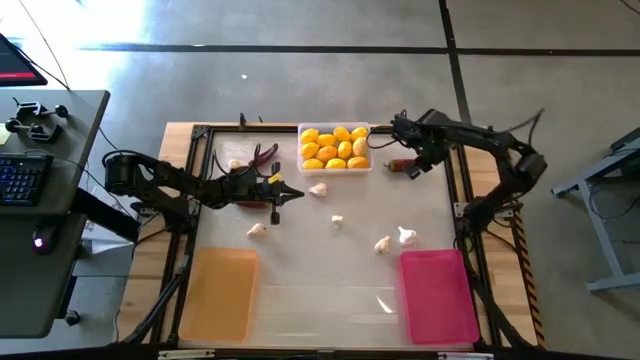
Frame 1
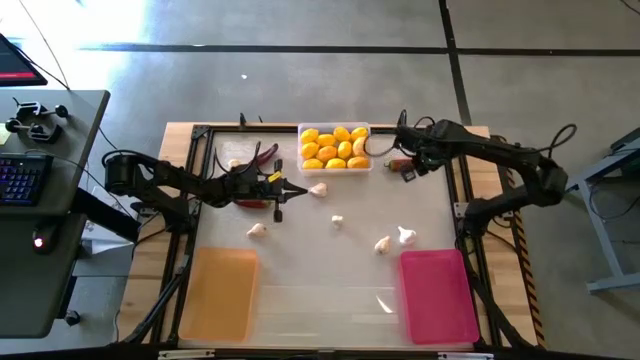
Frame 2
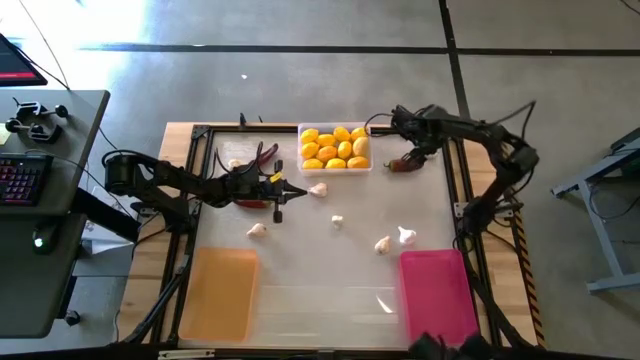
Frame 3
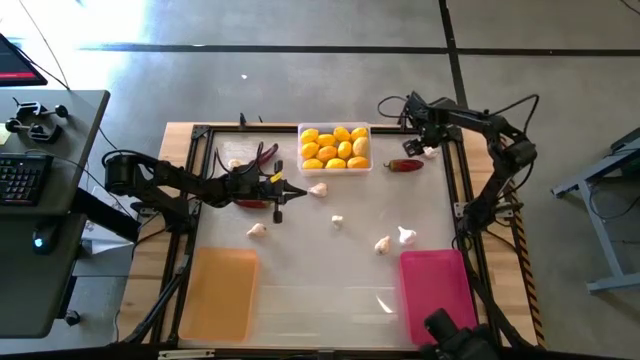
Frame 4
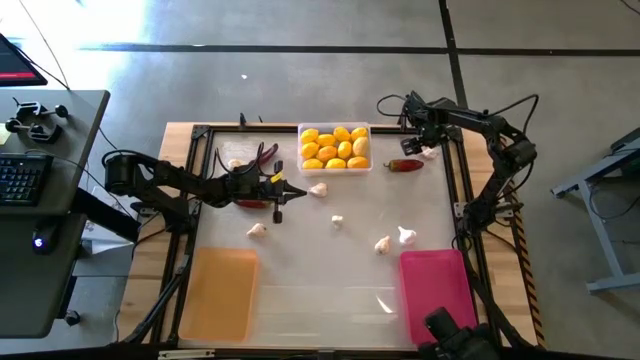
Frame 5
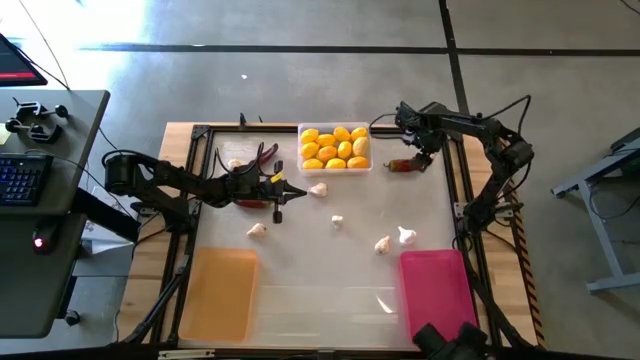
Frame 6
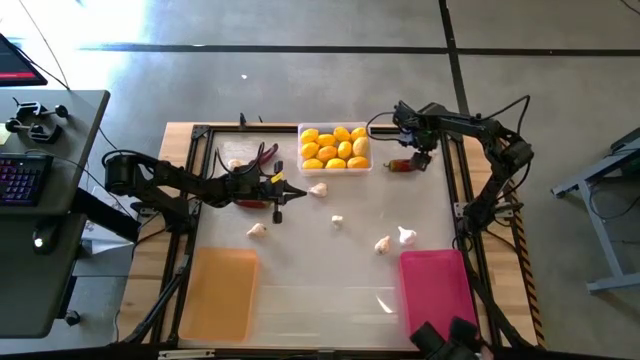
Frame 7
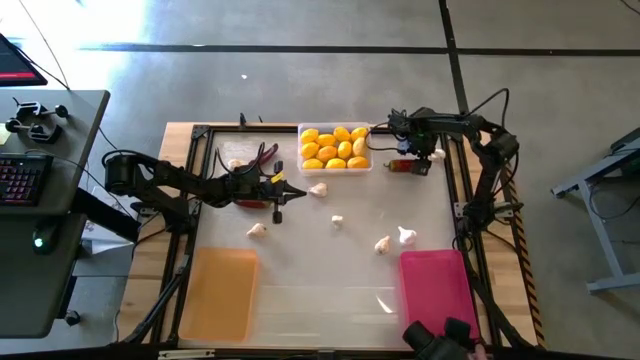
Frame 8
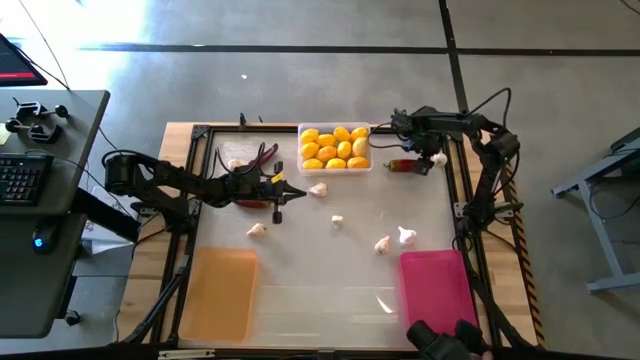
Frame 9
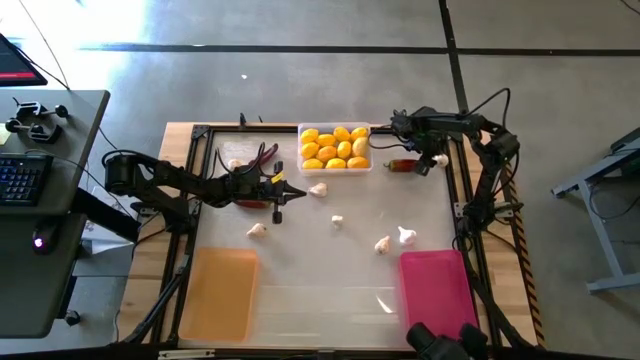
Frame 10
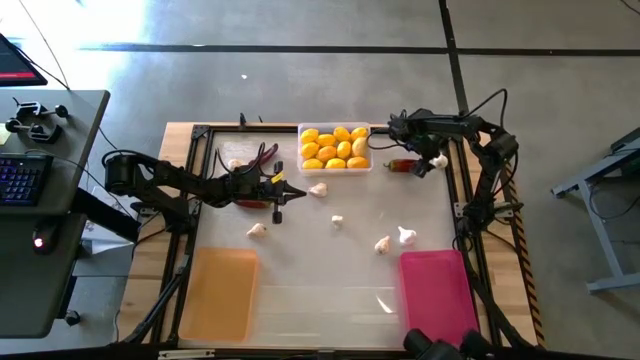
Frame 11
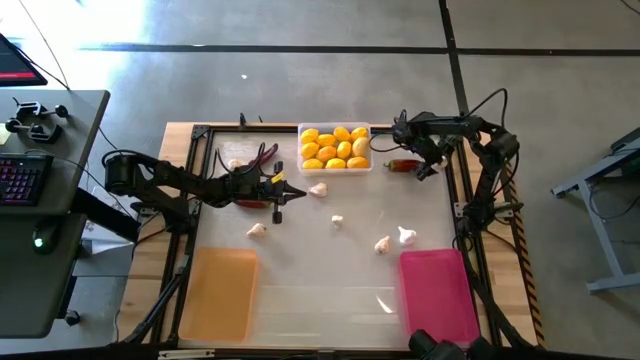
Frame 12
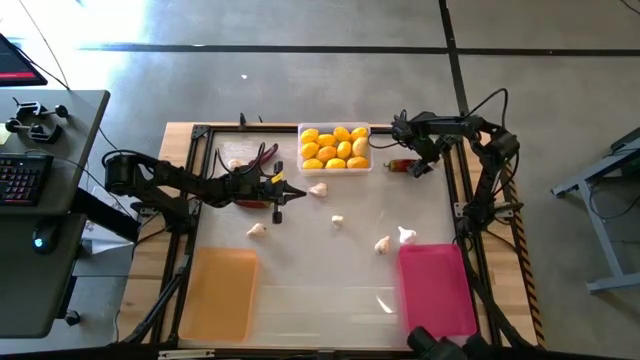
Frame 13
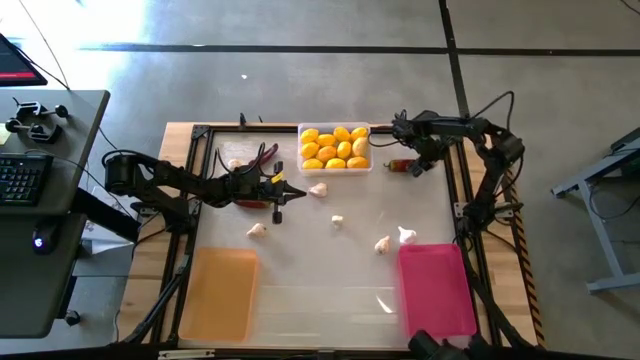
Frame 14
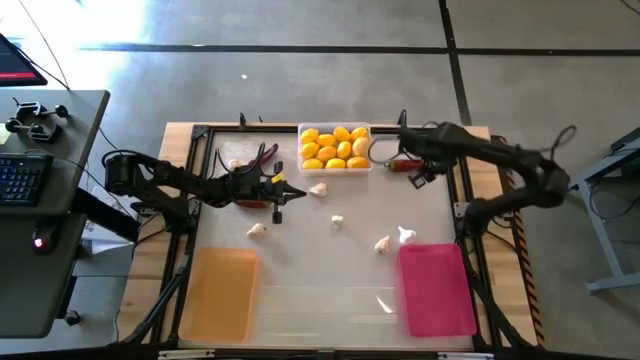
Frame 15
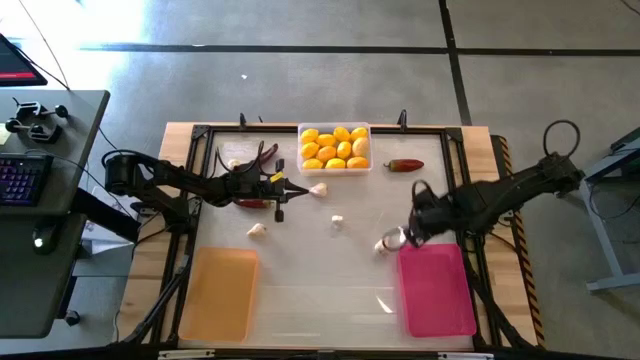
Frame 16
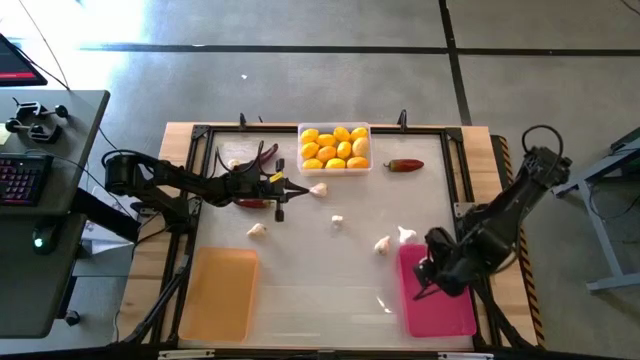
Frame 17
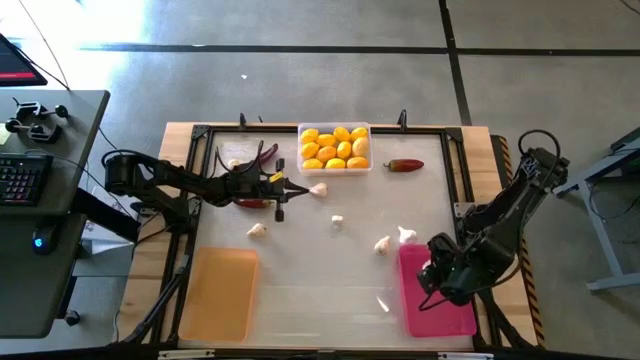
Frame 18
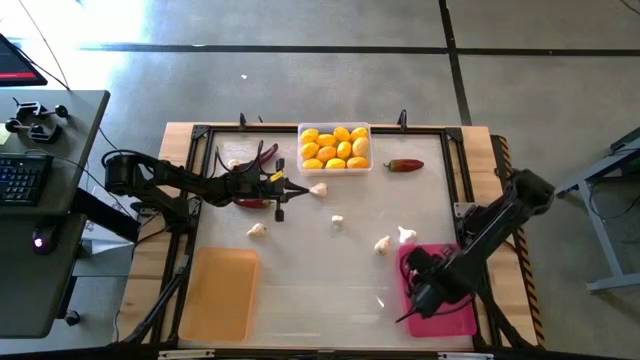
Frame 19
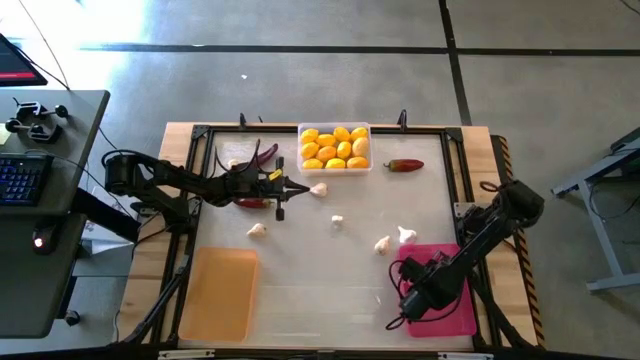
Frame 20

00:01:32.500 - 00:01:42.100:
Task: Sort produce into baskets
Put the top right garlic into the pink bin

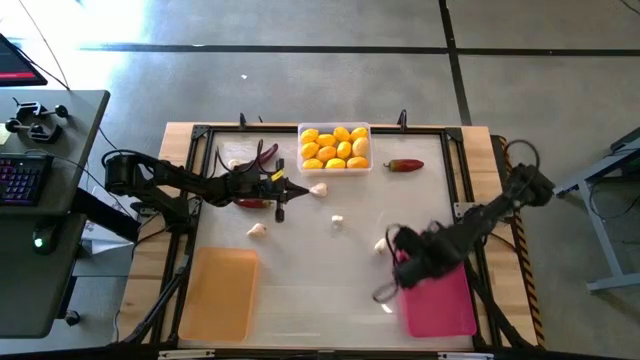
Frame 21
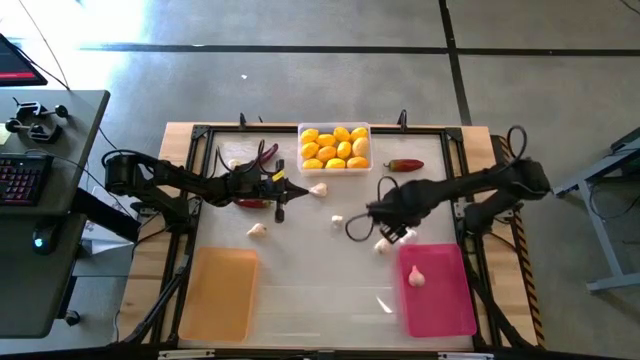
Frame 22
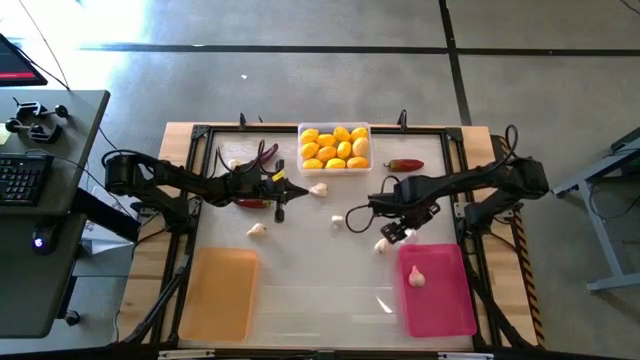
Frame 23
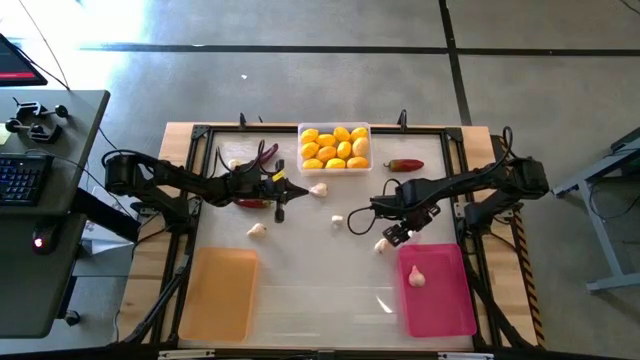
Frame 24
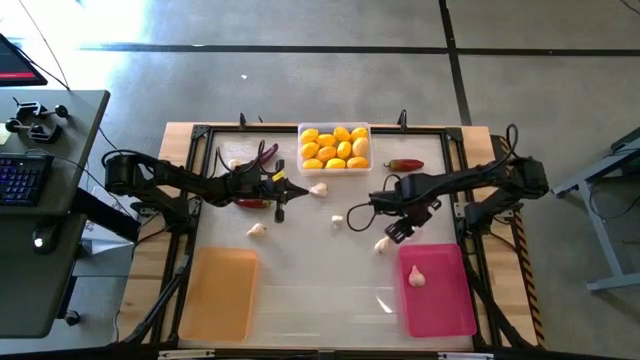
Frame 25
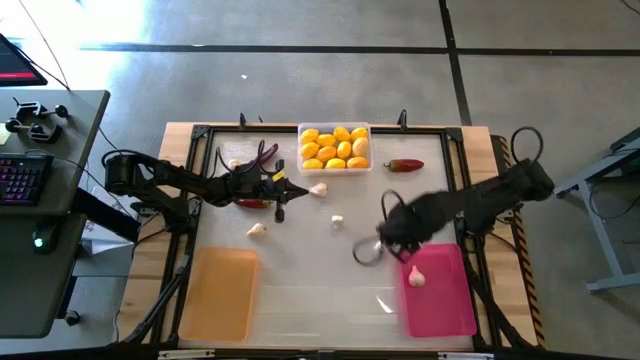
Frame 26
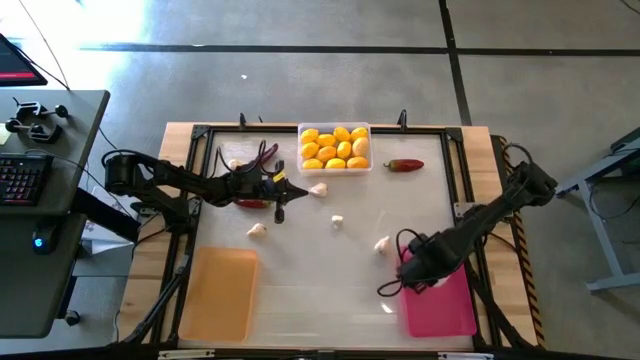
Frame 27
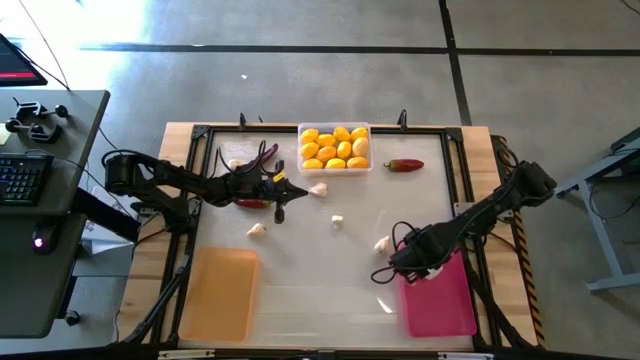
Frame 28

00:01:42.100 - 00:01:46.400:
Put the top right garlic into the pink bin

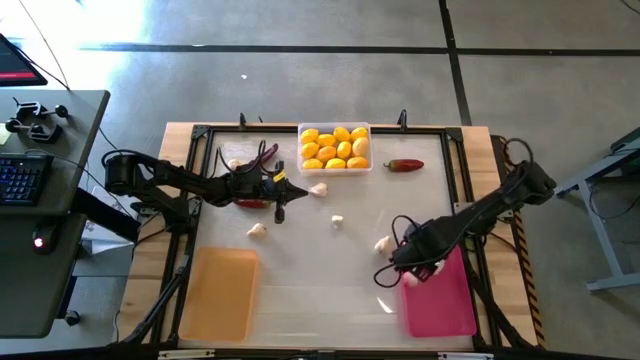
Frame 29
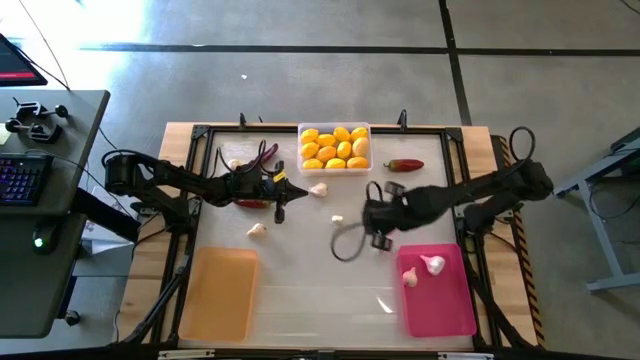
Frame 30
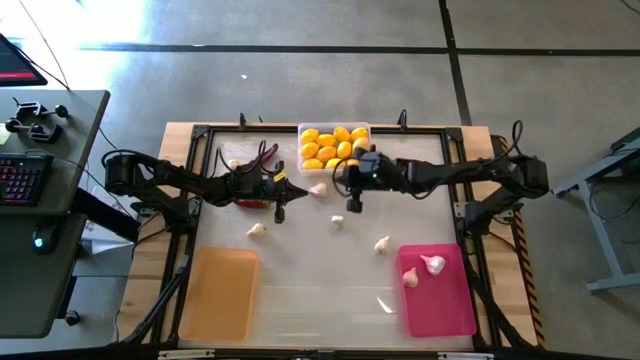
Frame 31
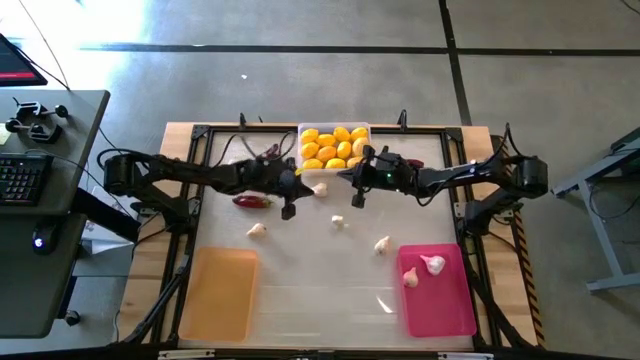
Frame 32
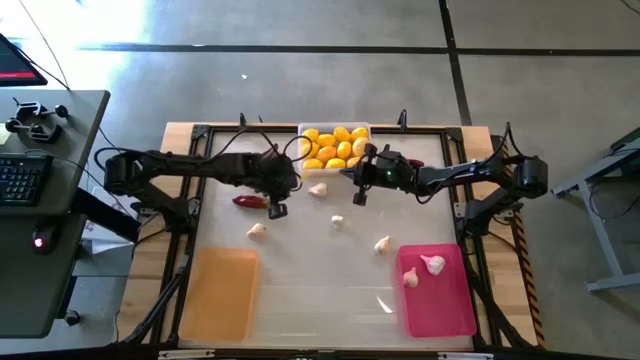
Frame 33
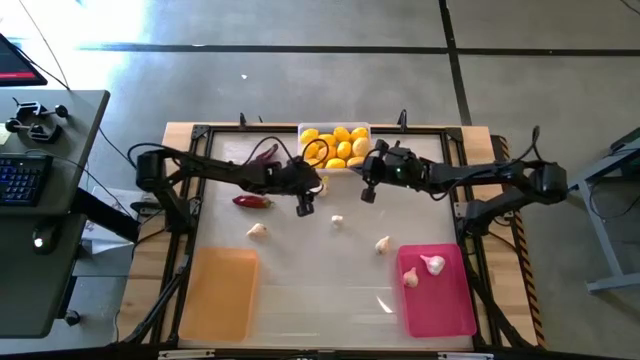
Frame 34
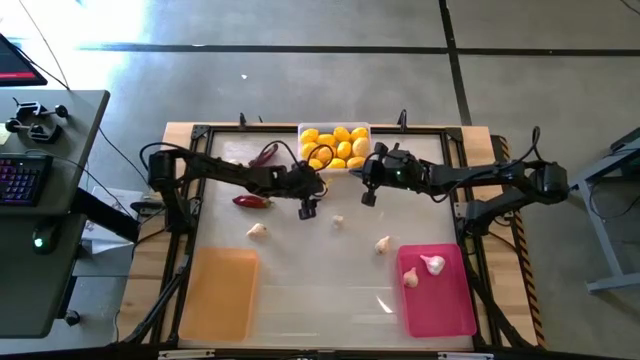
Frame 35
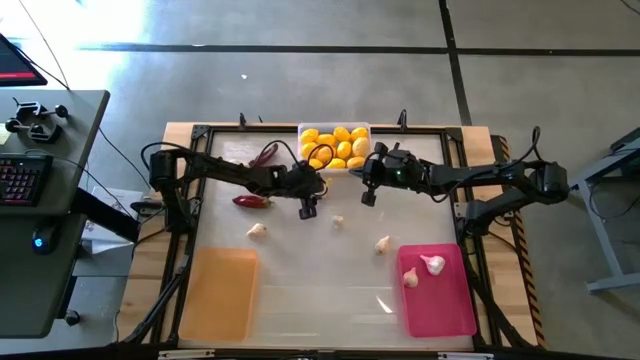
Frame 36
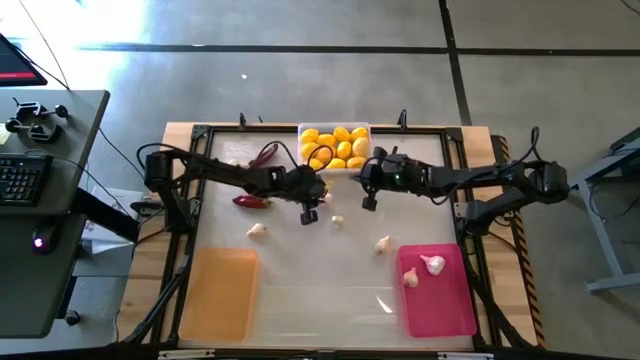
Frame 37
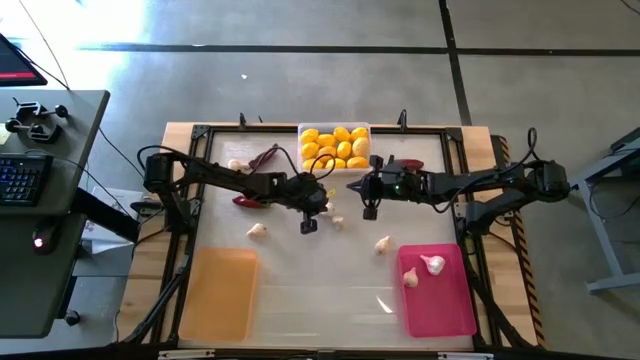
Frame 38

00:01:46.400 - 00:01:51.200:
Put the top center garlic into the pink bin

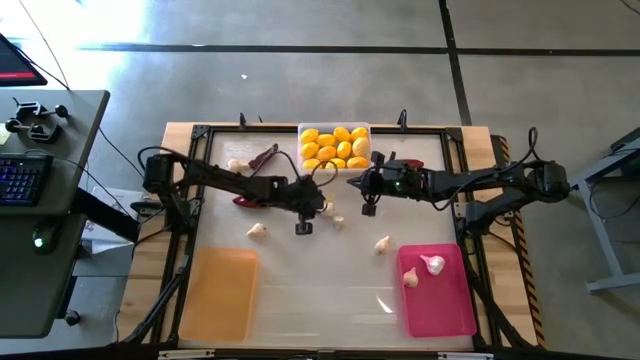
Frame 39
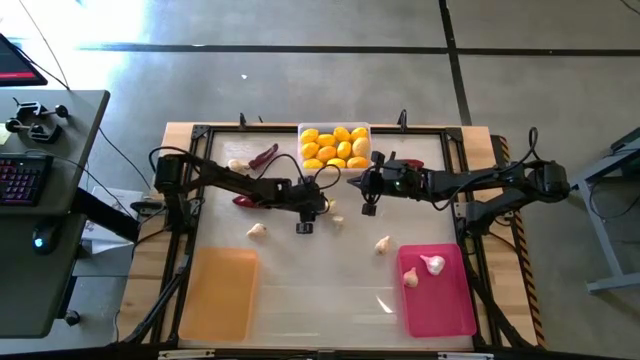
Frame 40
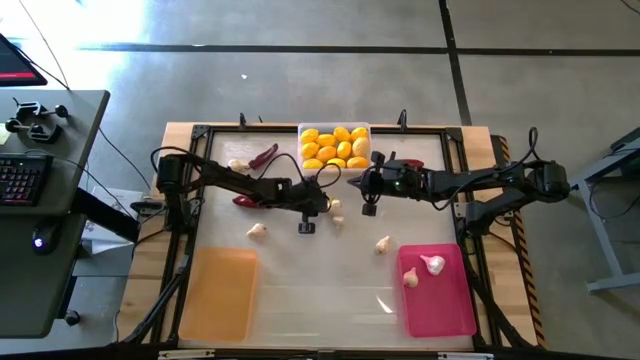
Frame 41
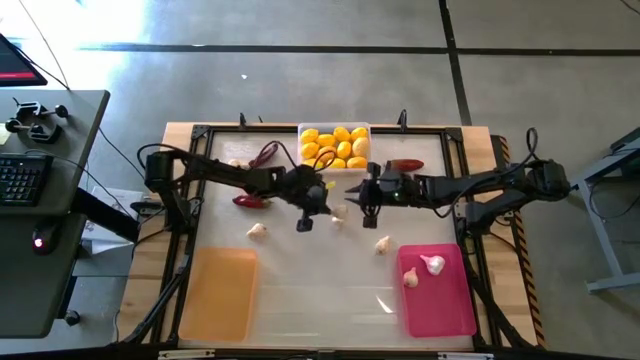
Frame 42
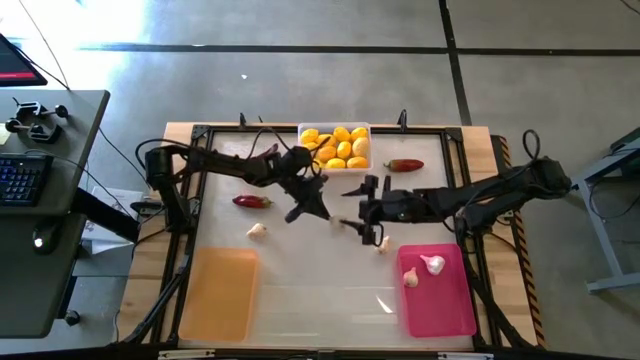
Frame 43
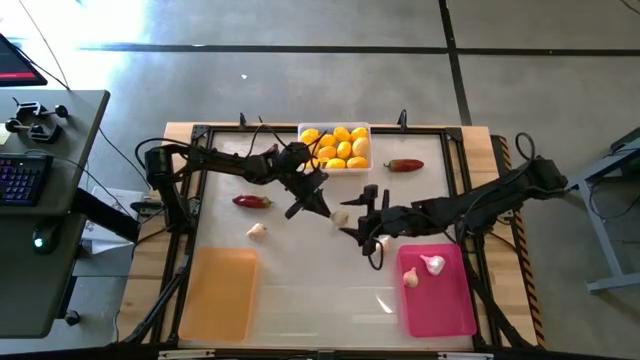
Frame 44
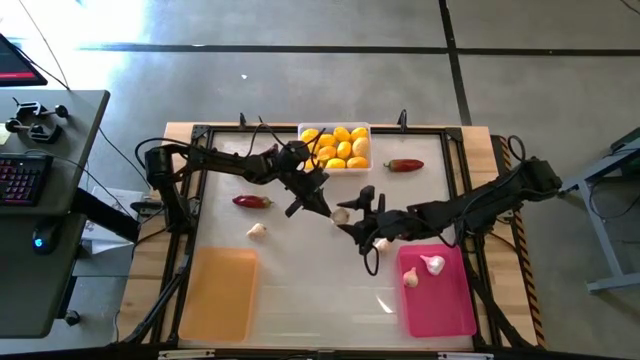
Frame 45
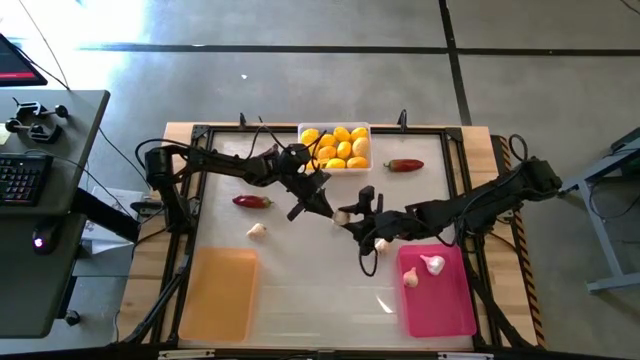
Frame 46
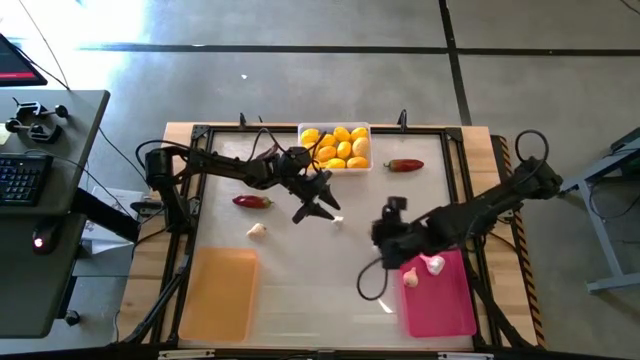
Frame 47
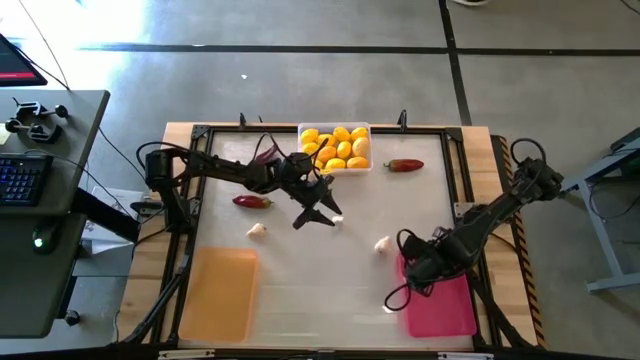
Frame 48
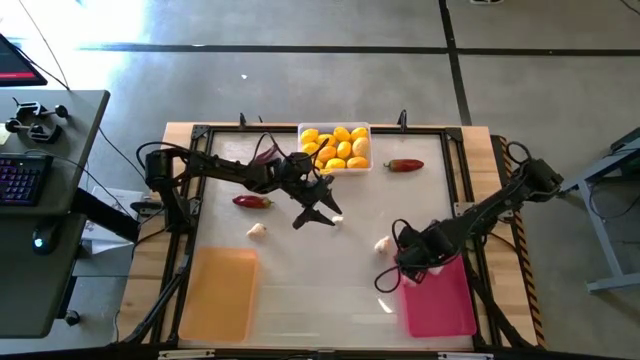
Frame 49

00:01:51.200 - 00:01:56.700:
Put the top center garlic into the pink bin
